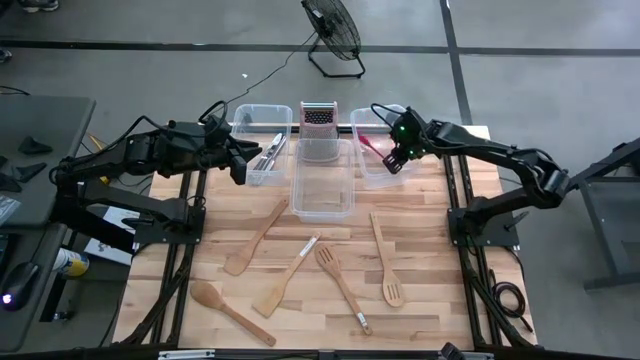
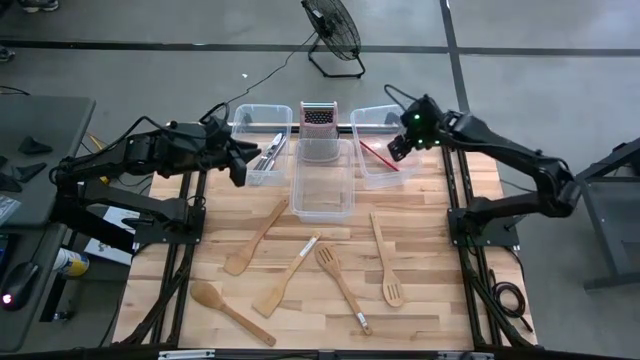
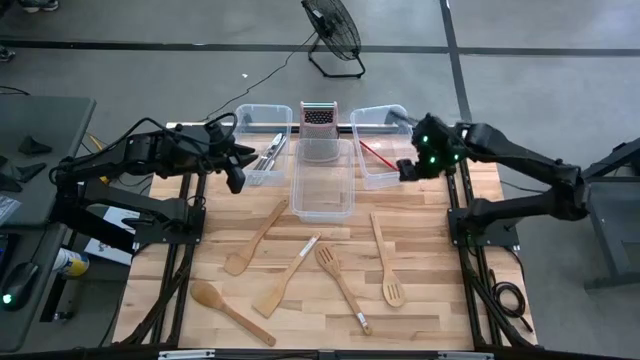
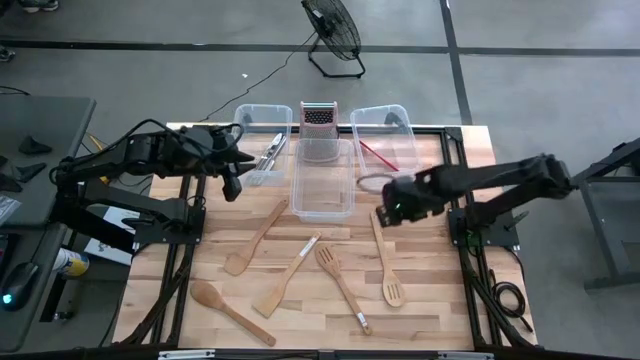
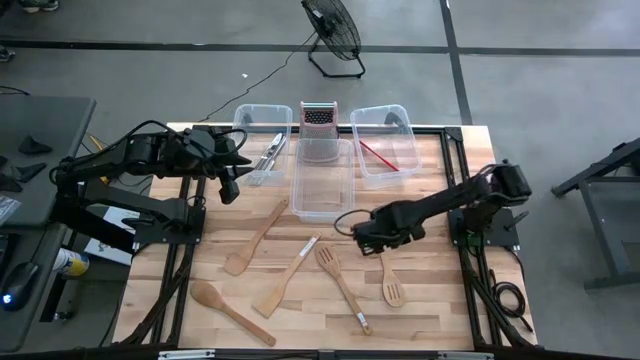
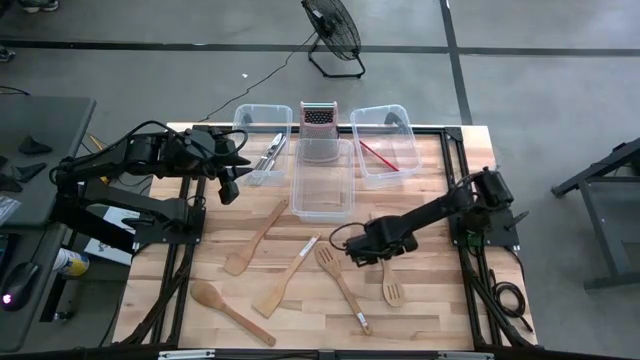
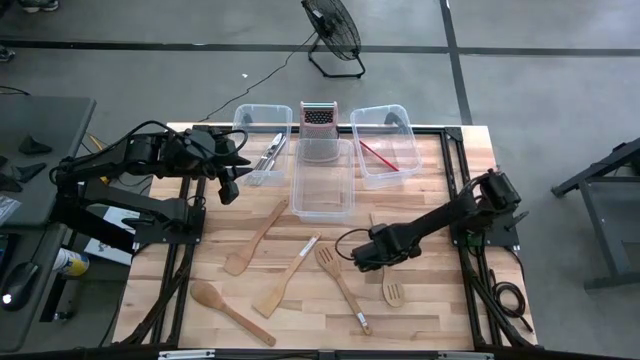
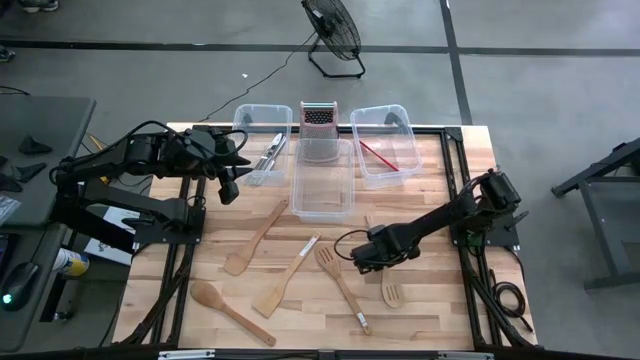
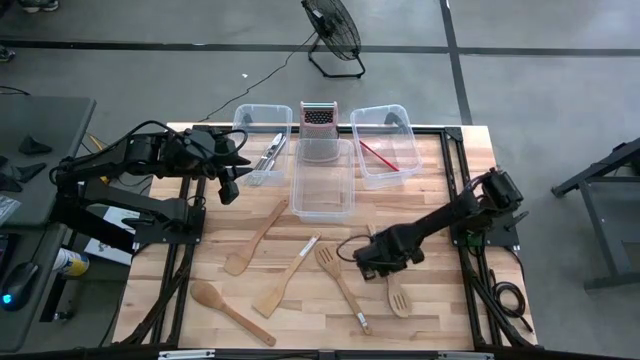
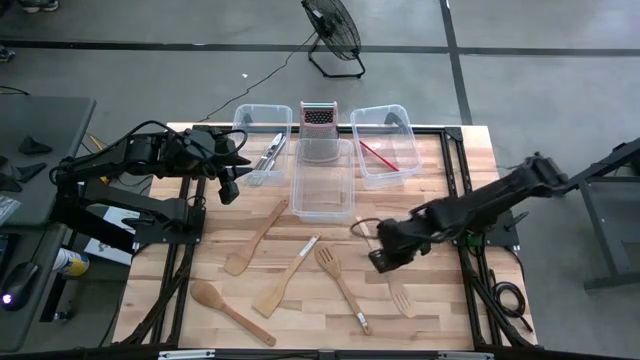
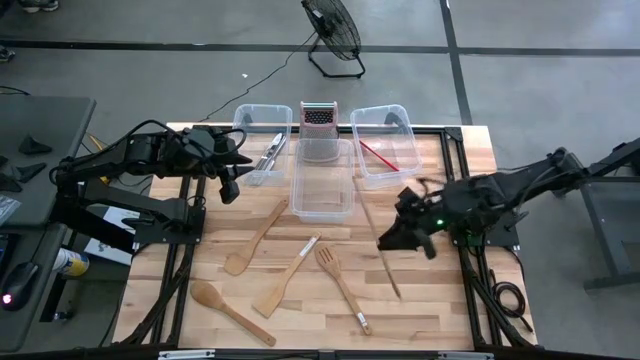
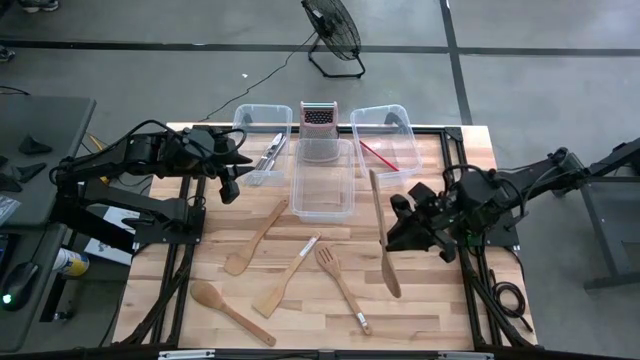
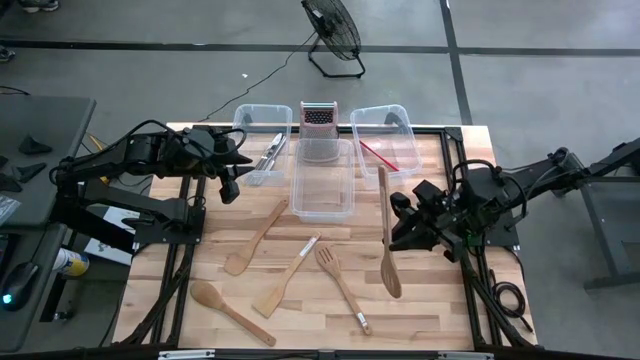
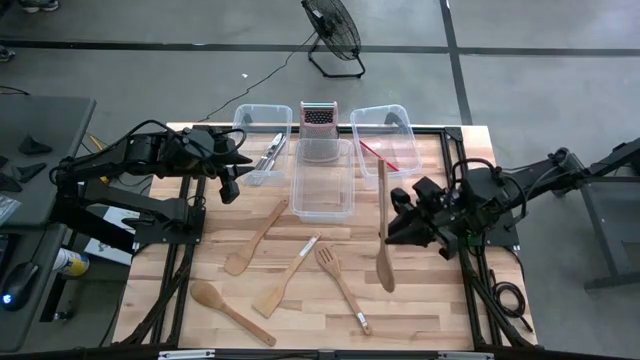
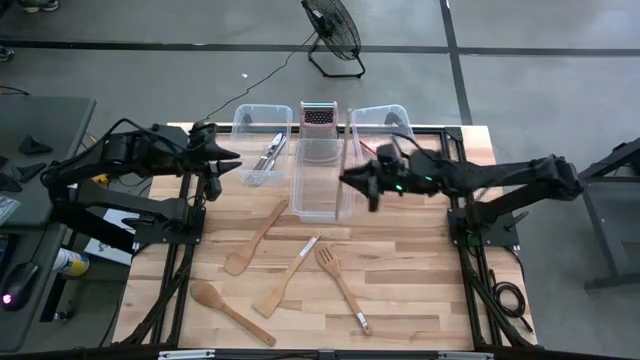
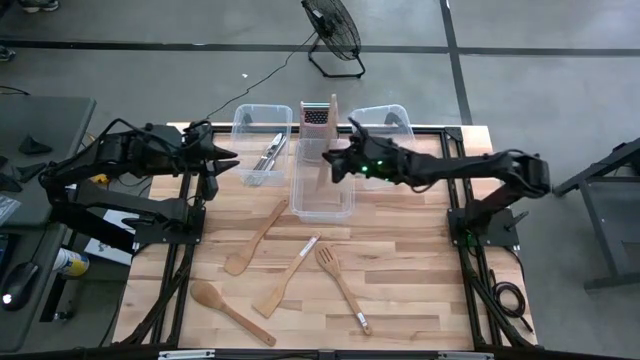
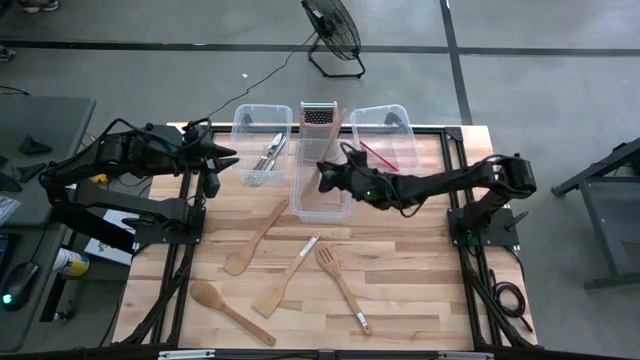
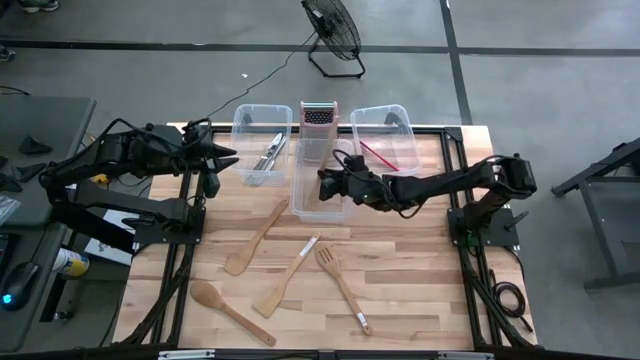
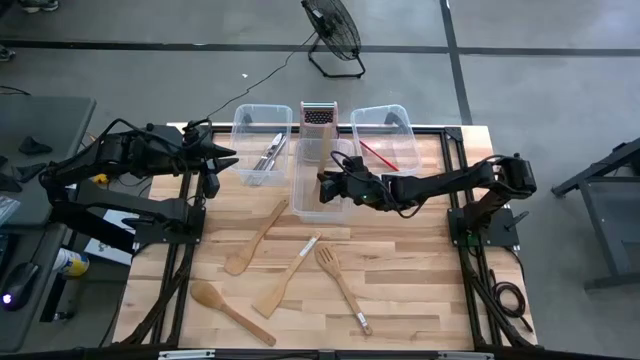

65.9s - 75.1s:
Task: Pick & Place Kitchen Items
Put the brown serving spoon into the middle transparent bin

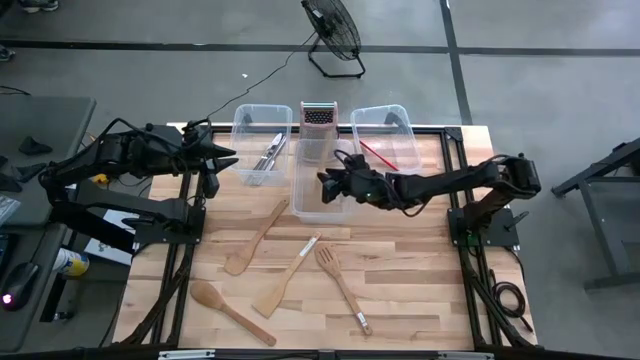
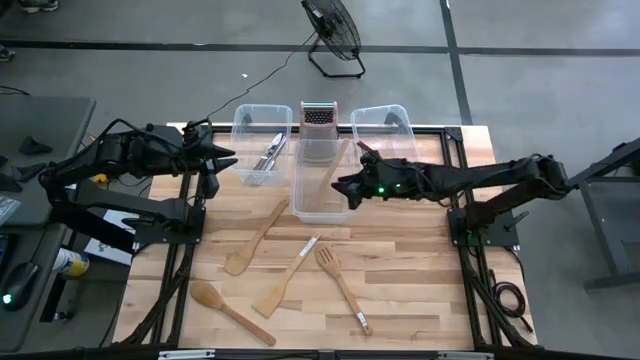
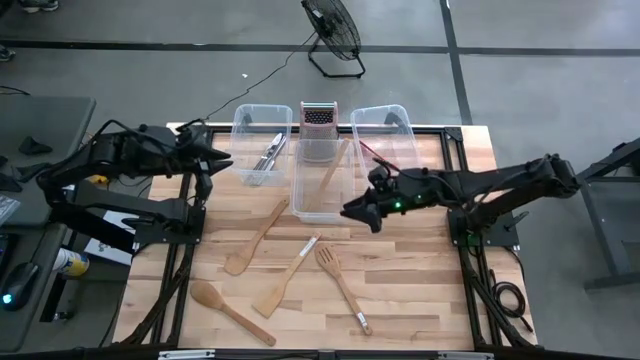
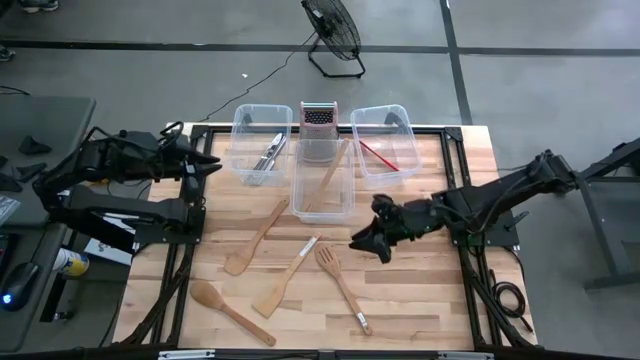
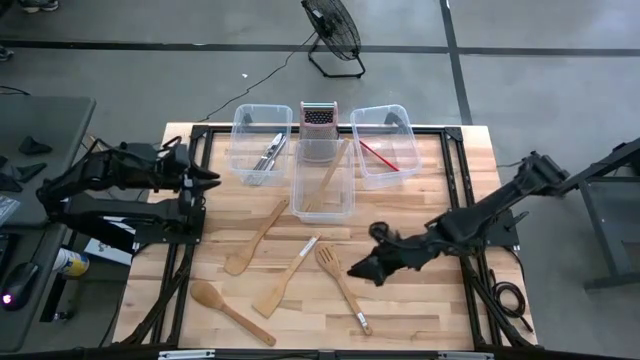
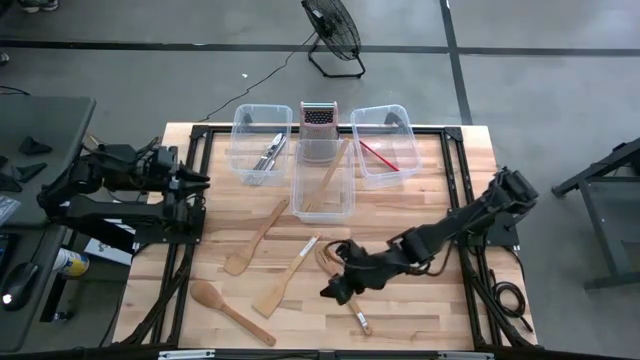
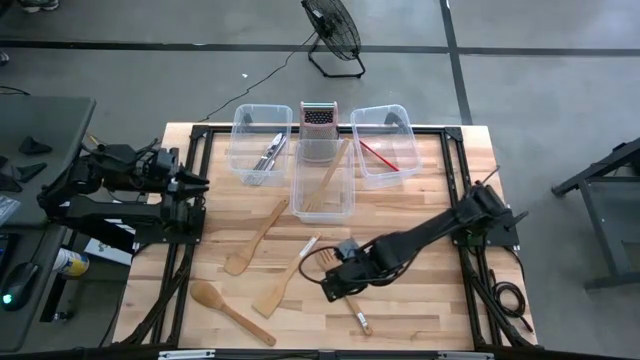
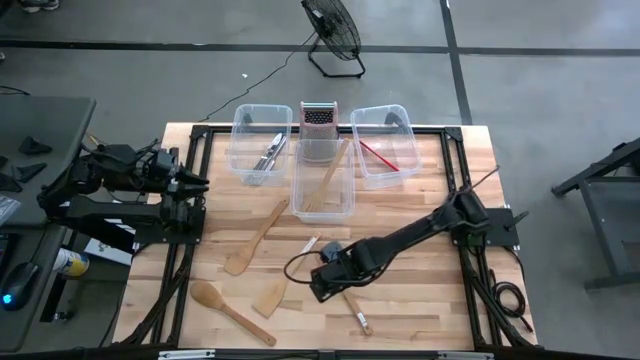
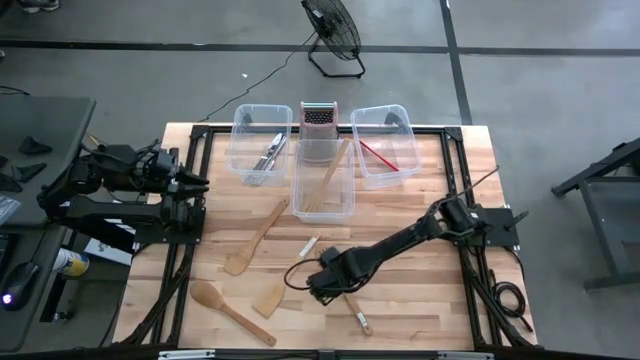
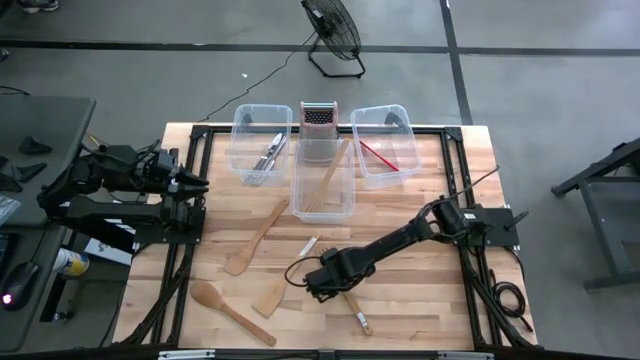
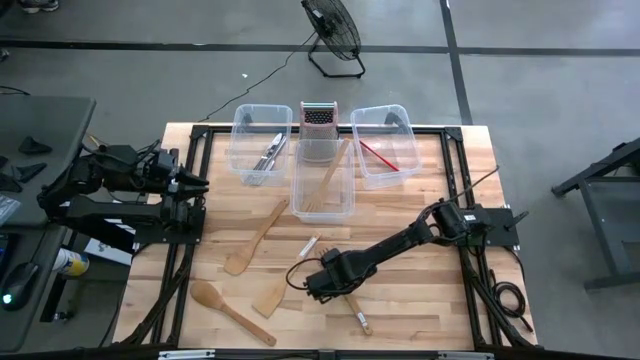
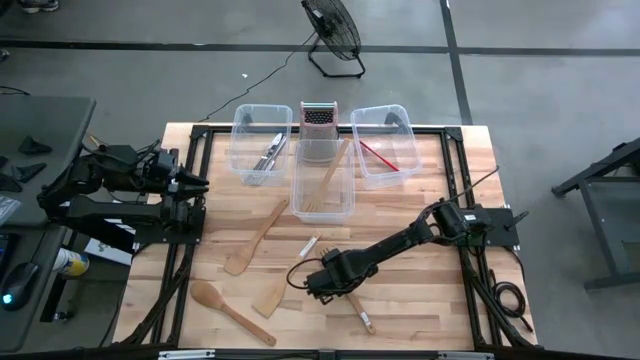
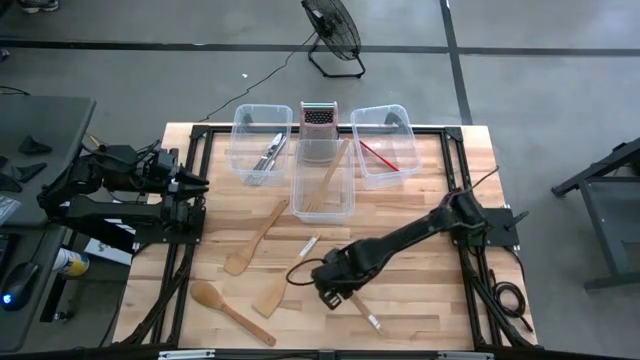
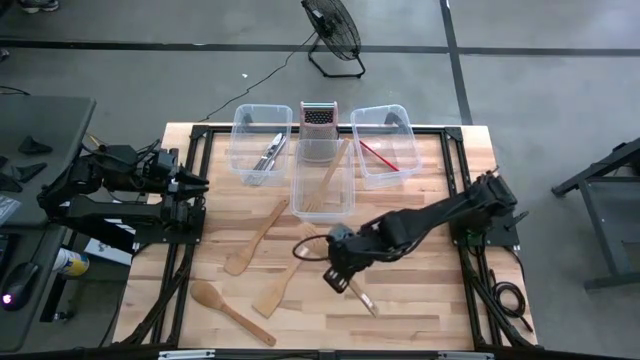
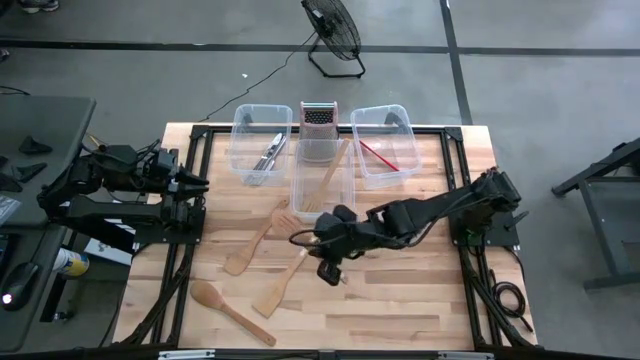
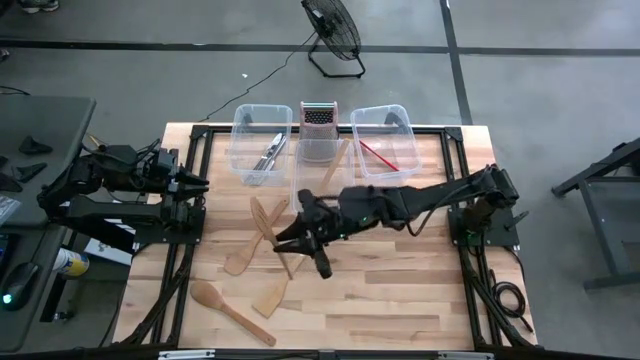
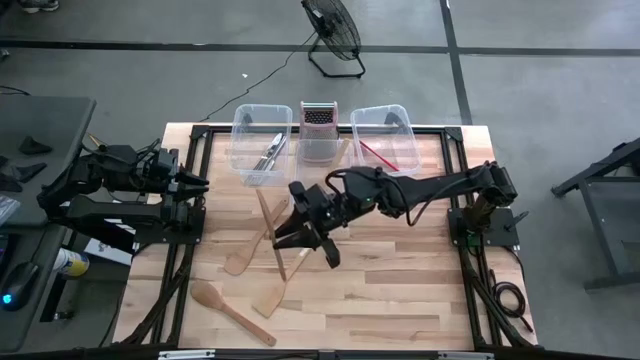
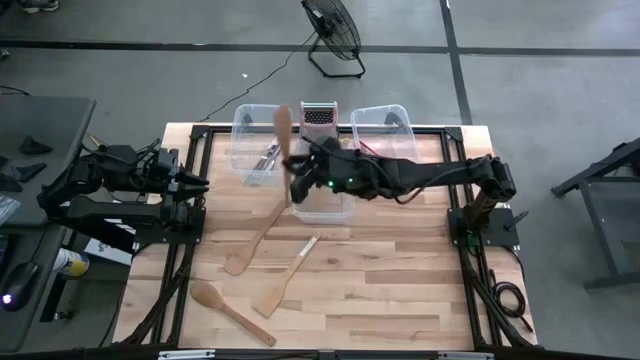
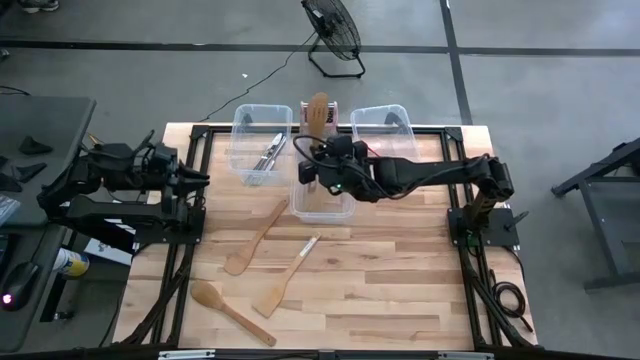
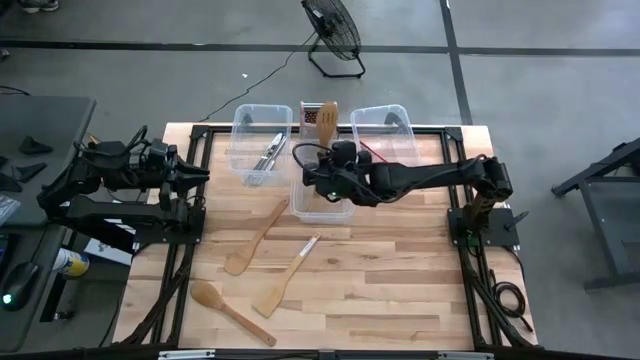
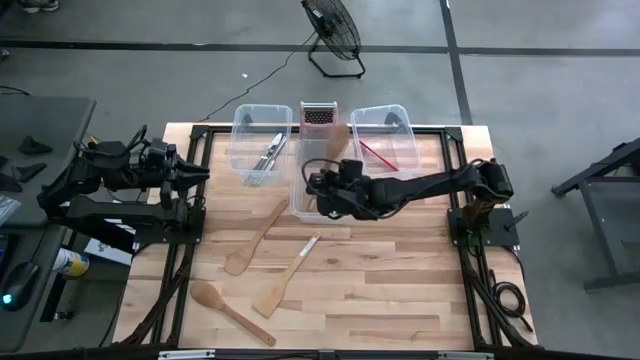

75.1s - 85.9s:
Put the brown serving spoon into the middle transparent bin
